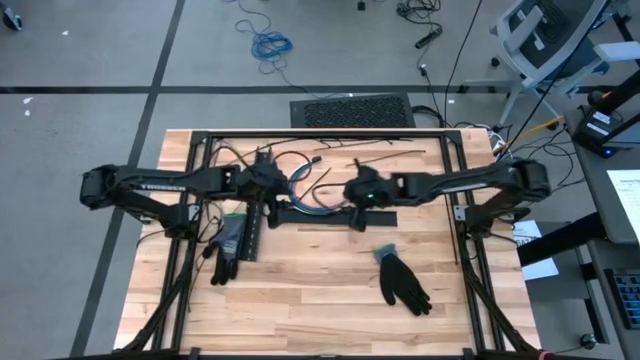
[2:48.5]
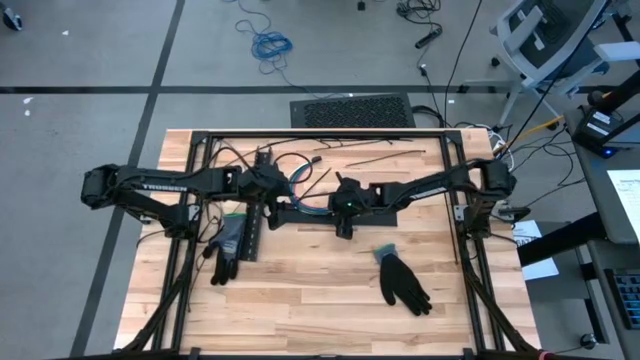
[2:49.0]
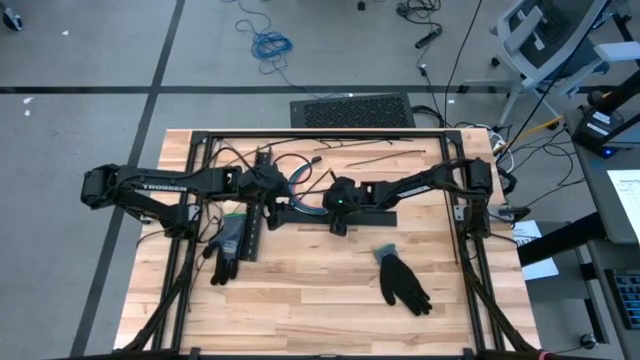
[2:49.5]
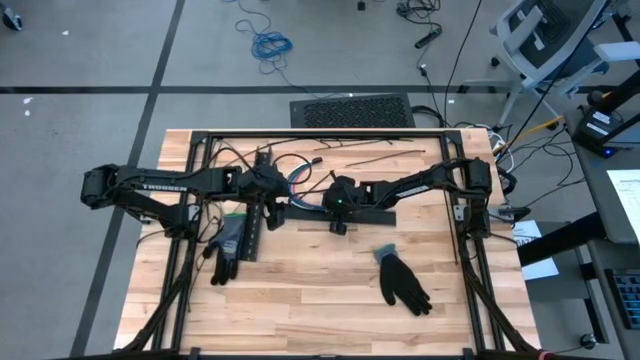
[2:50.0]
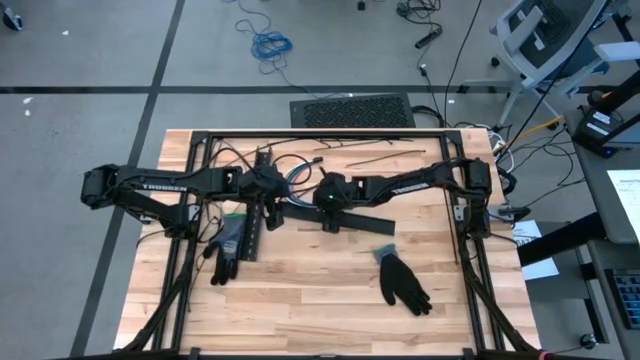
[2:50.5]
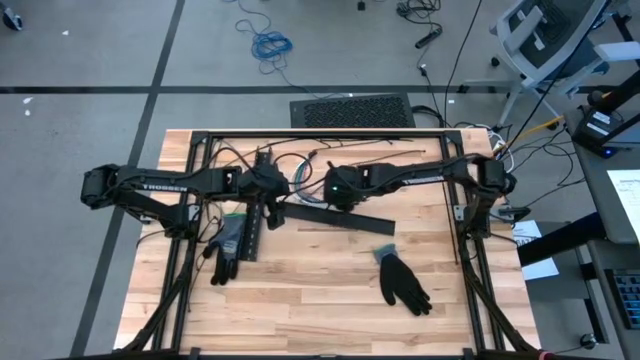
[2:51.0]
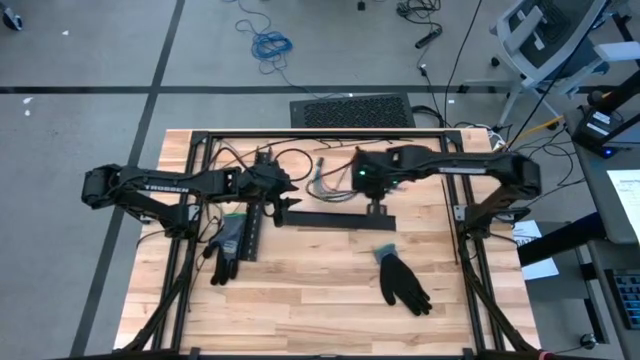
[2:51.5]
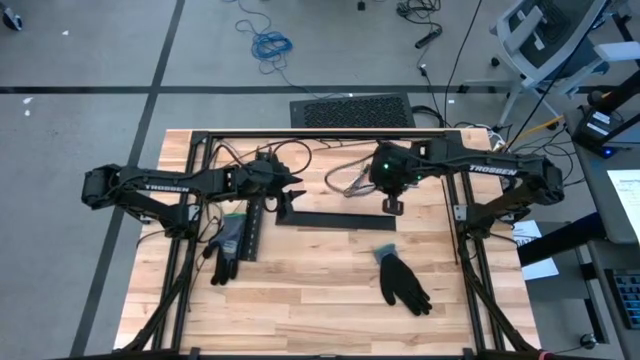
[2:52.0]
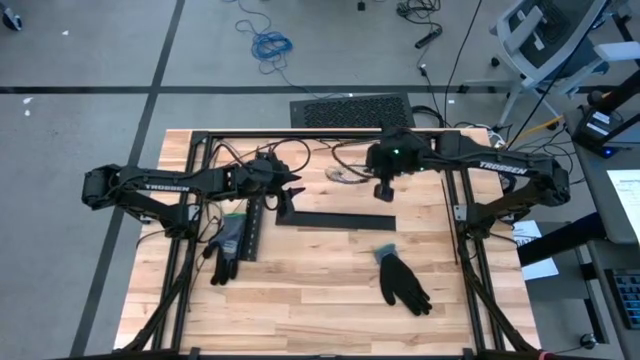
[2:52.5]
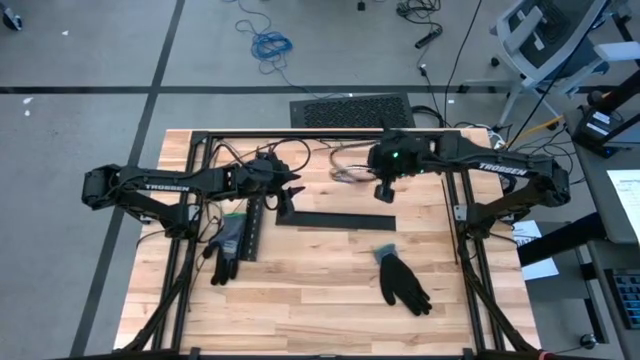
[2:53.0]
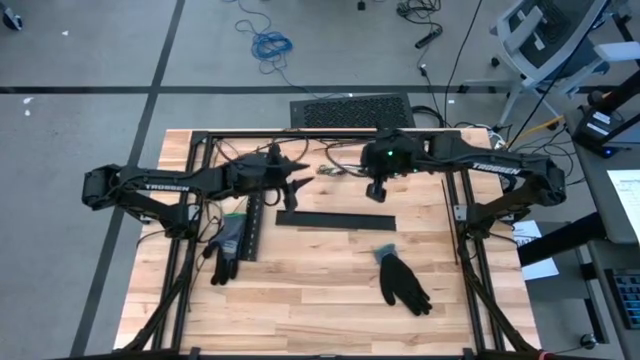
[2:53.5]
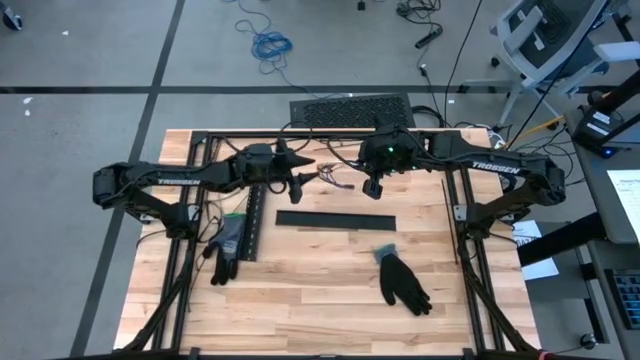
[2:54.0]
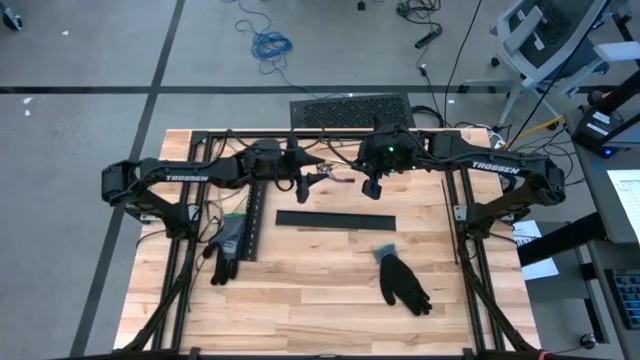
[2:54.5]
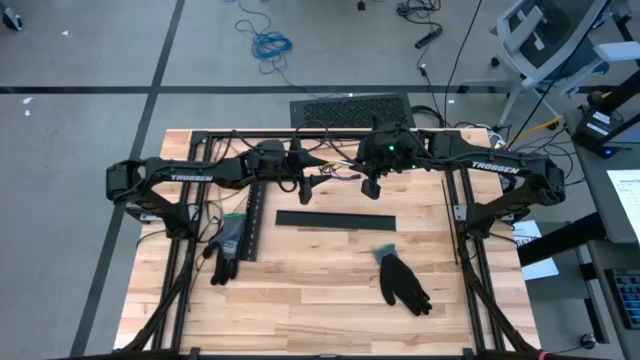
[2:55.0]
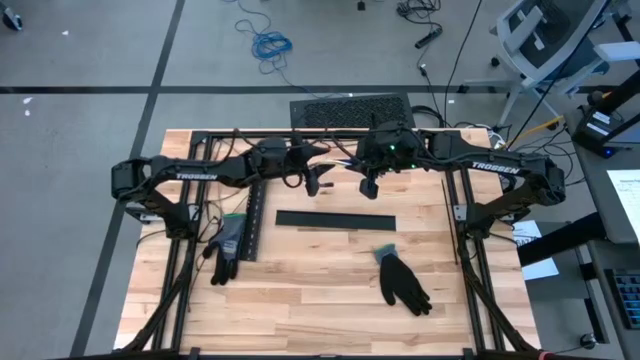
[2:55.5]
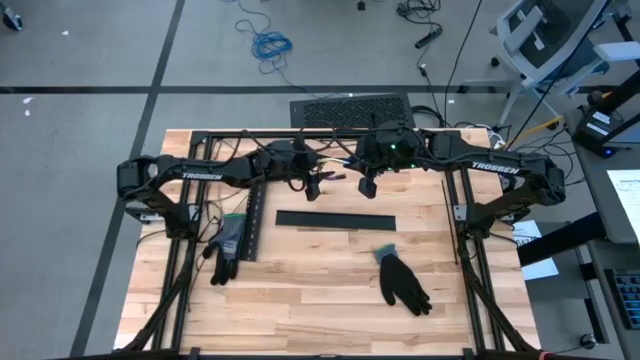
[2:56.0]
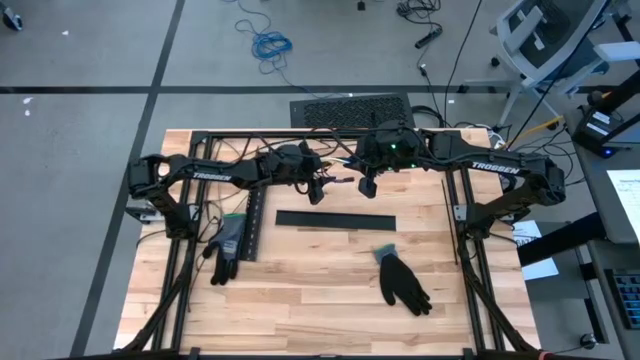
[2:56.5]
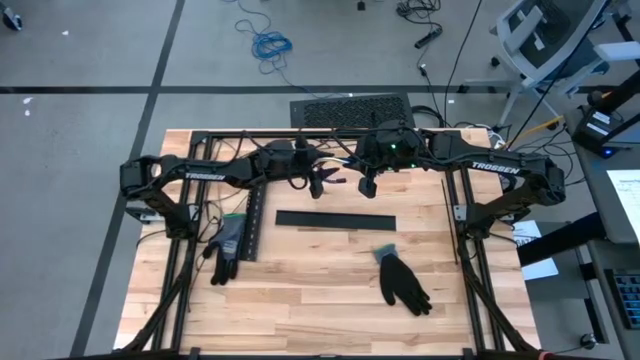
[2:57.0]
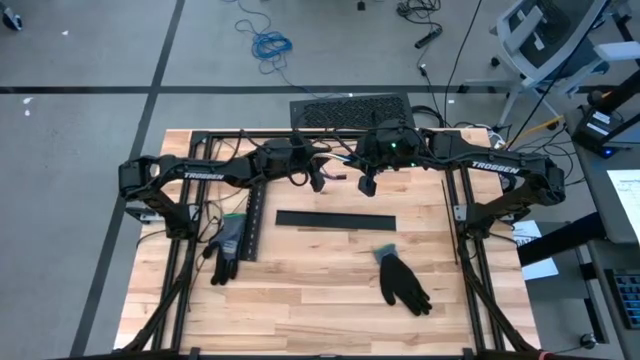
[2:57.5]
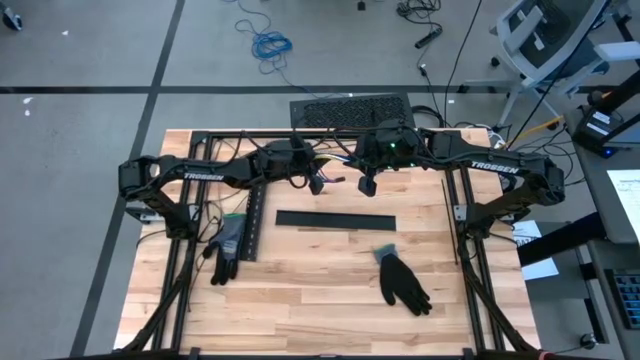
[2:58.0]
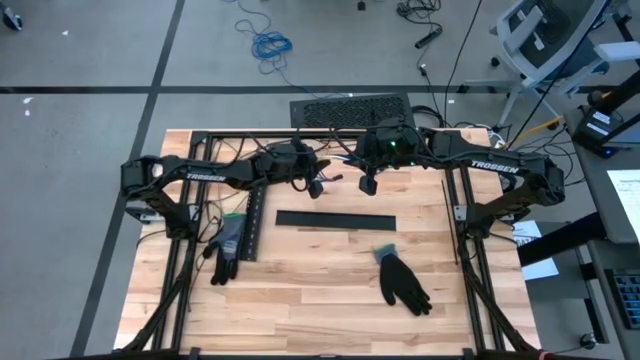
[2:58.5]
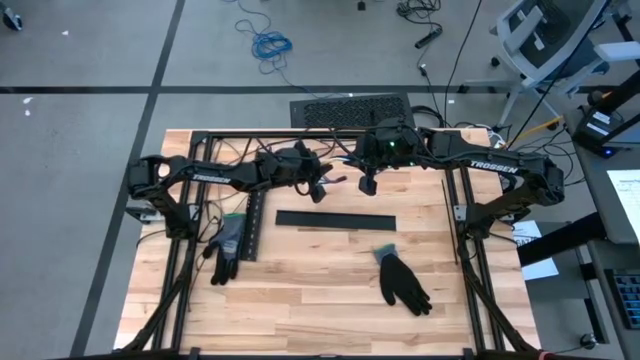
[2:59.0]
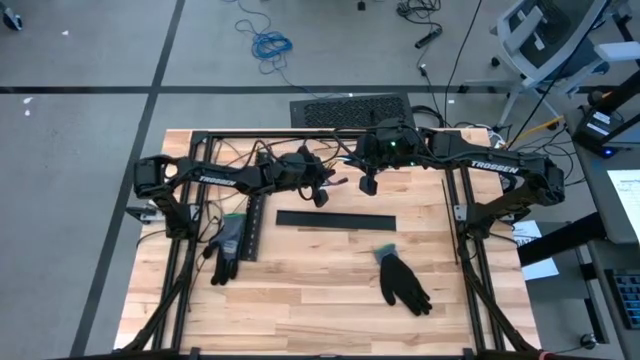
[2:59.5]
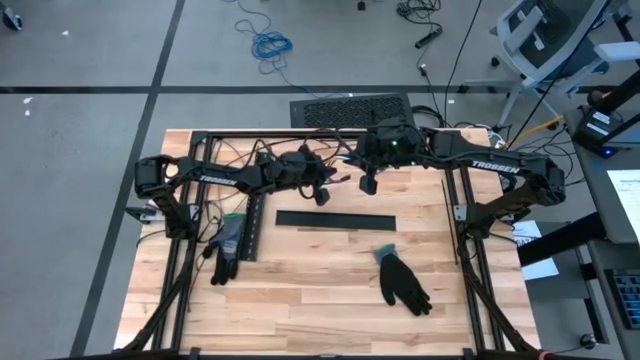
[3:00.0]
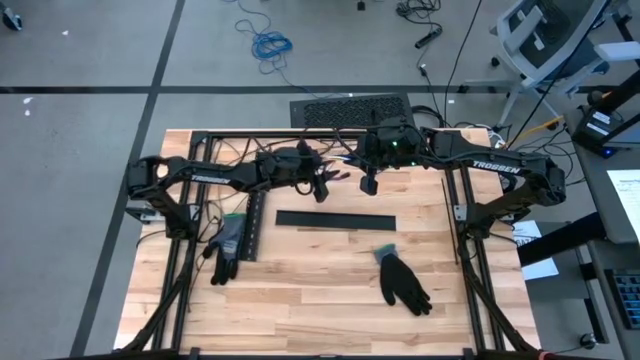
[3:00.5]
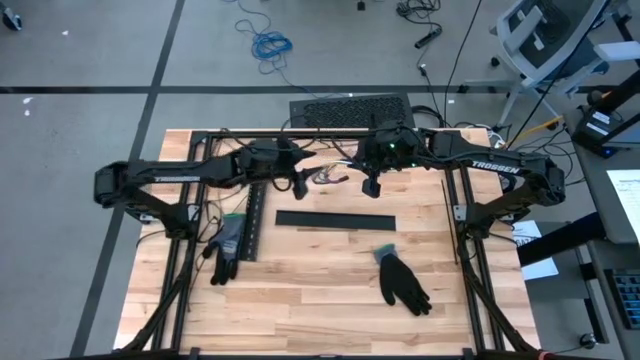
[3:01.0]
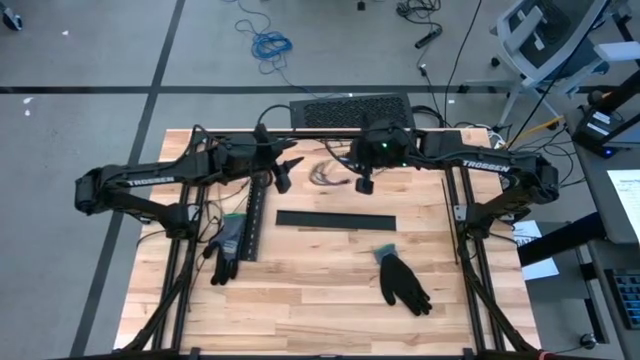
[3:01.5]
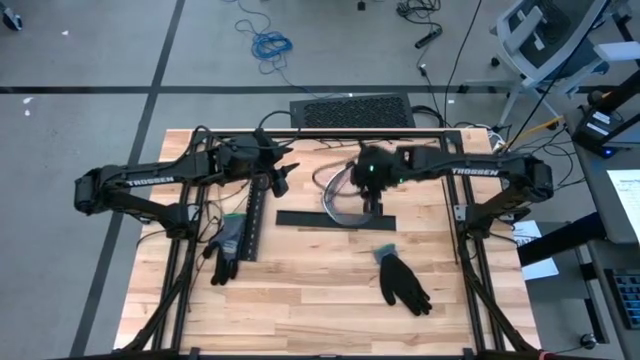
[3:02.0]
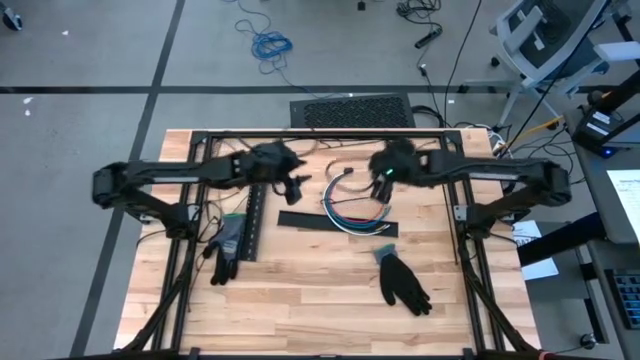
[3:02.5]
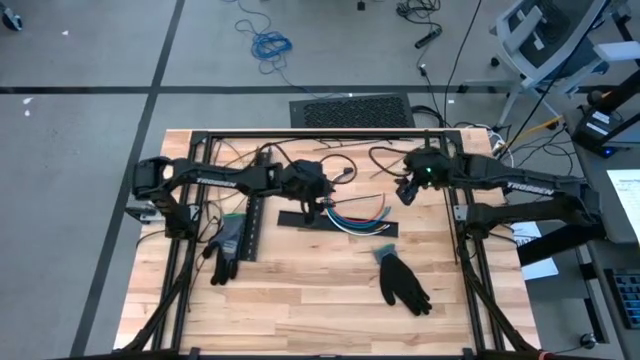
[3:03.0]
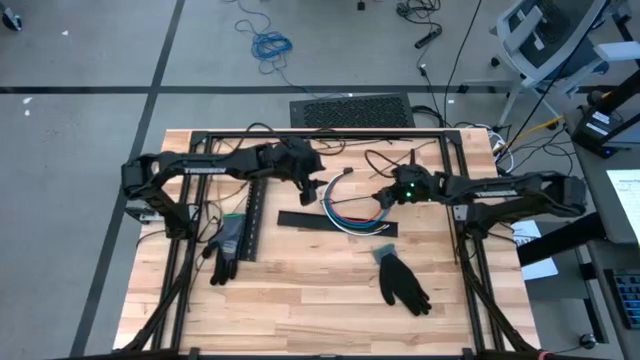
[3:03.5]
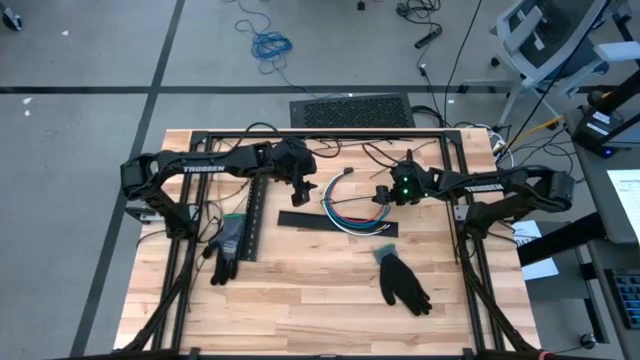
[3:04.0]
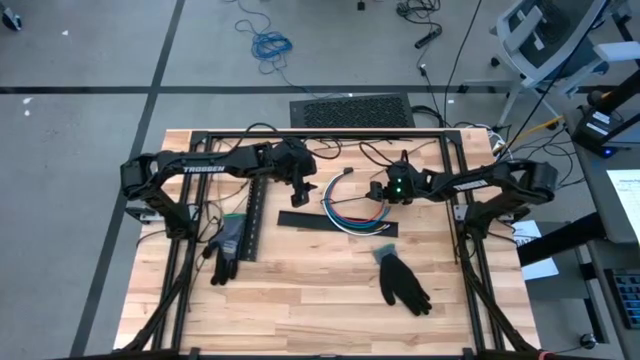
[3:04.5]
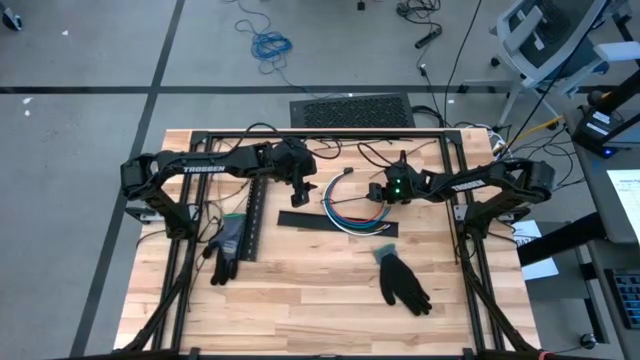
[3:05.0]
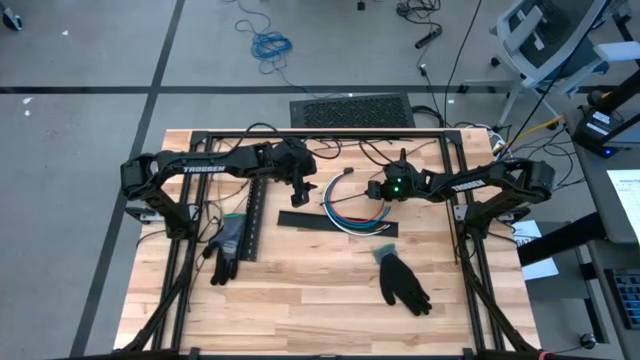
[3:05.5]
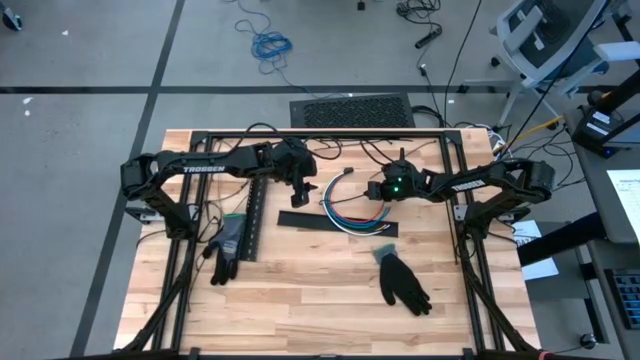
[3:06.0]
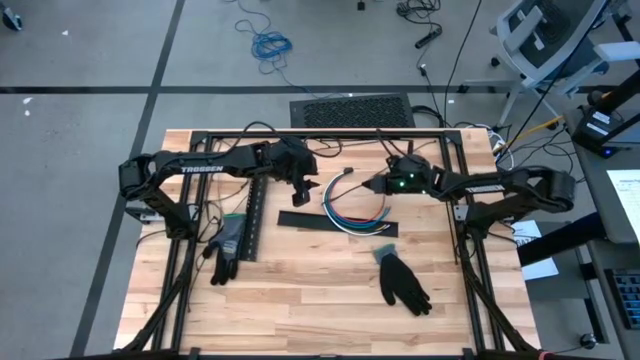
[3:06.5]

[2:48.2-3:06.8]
Task: Ziptie cables
Wrap the cable wires with the black ziptie
